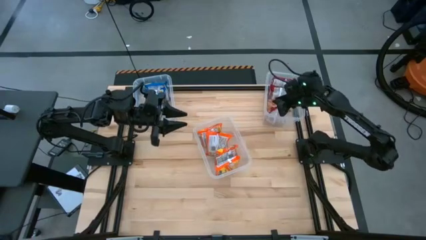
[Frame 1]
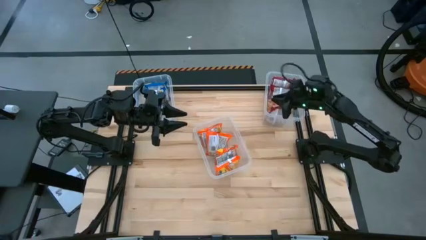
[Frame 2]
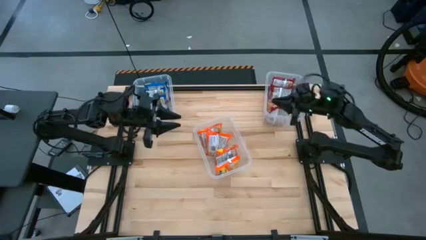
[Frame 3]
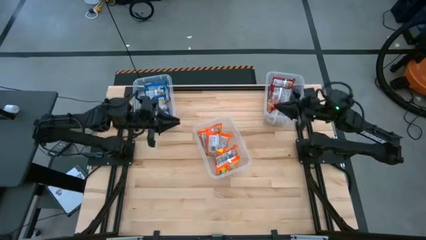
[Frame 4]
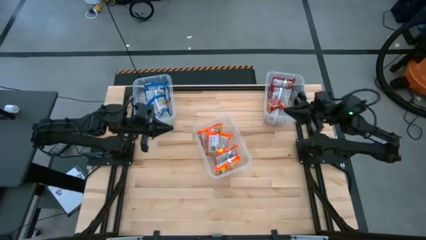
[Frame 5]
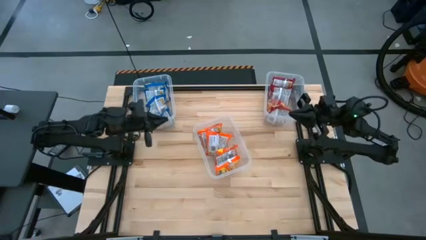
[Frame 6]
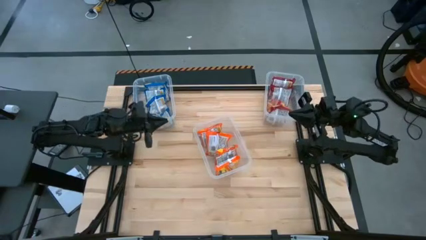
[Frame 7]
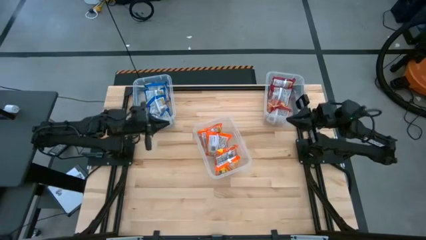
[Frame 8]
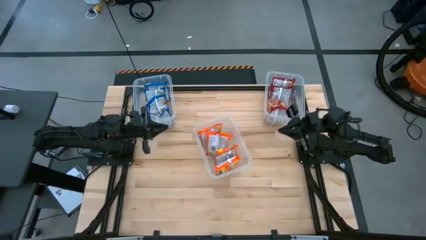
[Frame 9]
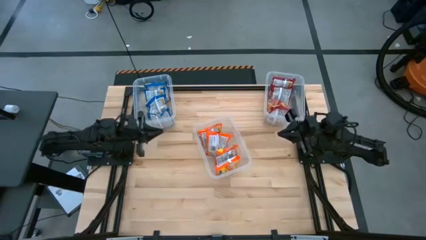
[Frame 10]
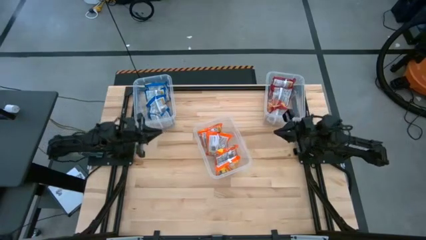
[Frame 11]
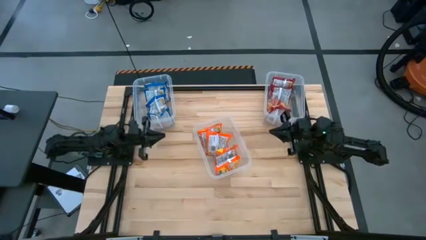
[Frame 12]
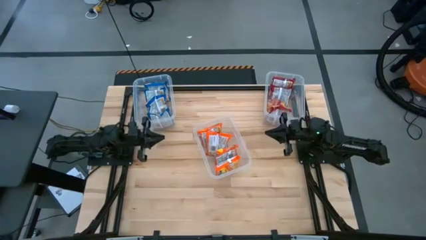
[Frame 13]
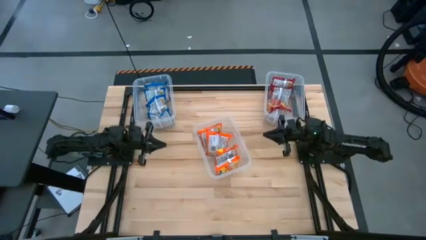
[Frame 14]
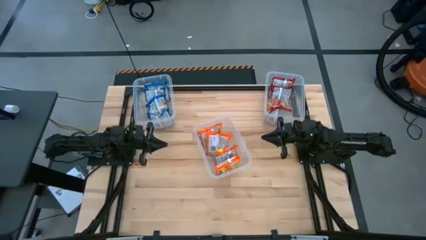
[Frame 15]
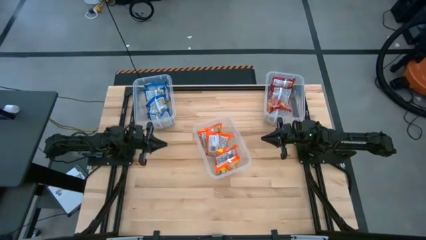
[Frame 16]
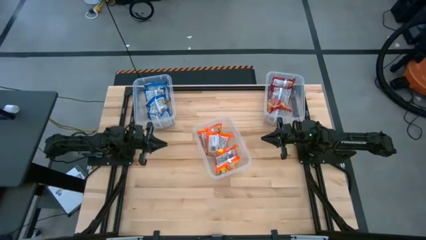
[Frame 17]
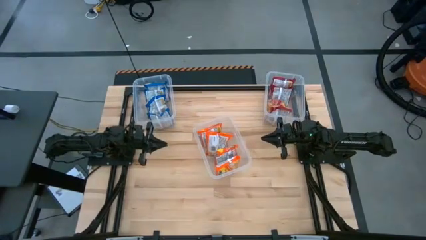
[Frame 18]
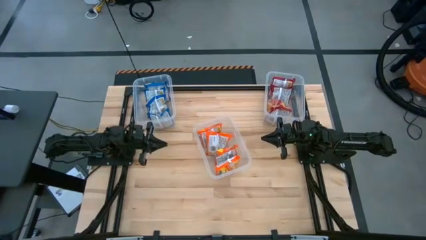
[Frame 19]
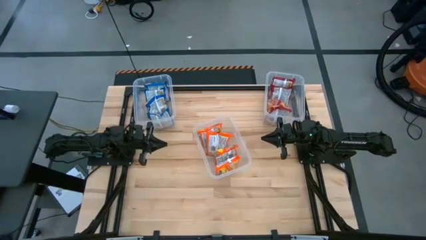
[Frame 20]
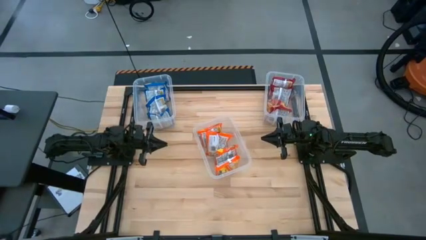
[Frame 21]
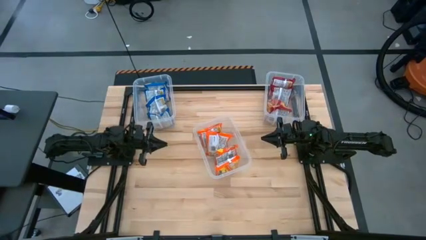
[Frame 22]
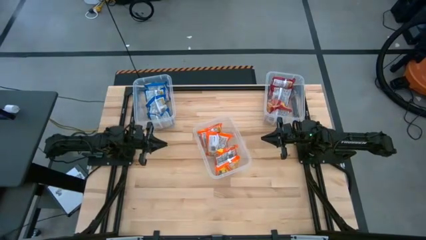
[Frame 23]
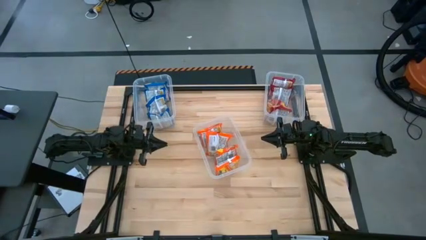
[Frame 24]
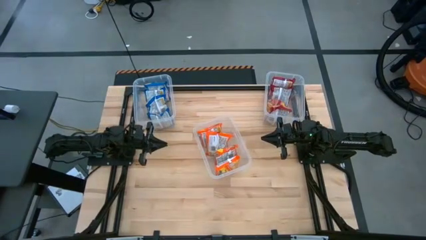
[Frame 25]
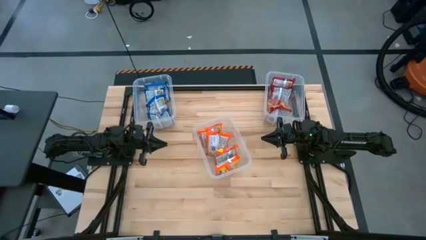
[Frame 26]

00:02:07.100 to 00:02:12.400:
Task: Sort Maruchan noodles
Return to Home Position

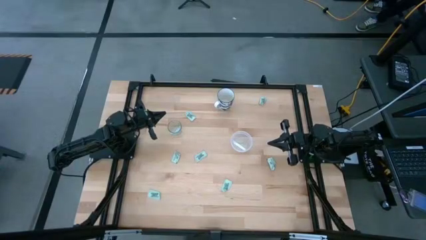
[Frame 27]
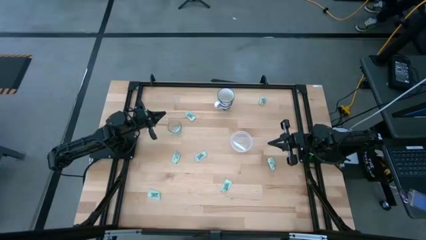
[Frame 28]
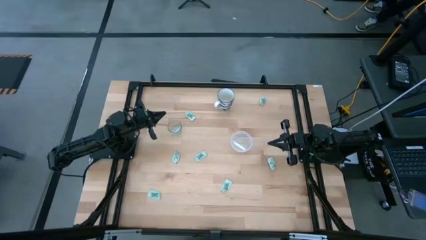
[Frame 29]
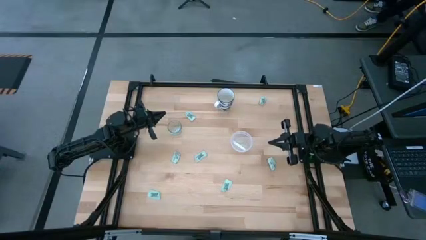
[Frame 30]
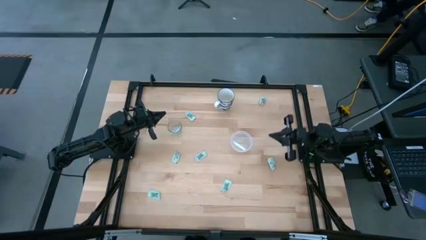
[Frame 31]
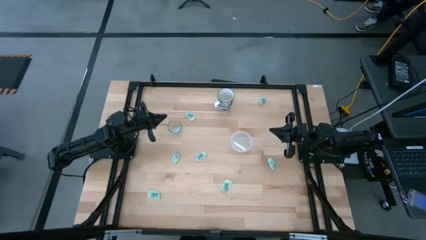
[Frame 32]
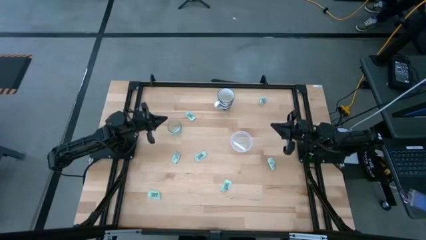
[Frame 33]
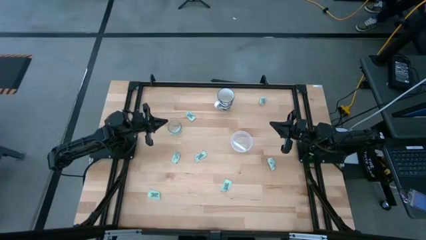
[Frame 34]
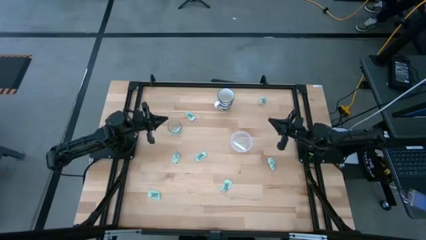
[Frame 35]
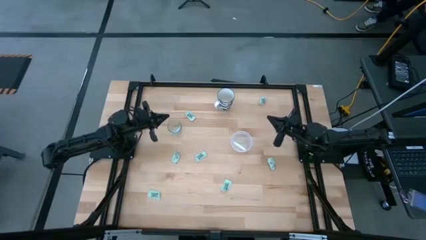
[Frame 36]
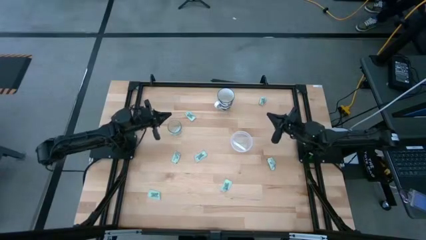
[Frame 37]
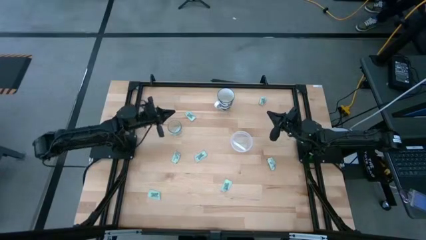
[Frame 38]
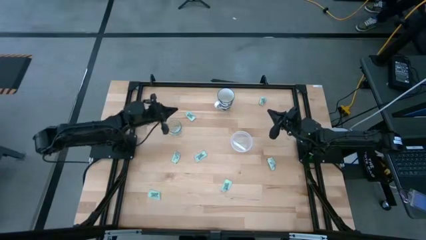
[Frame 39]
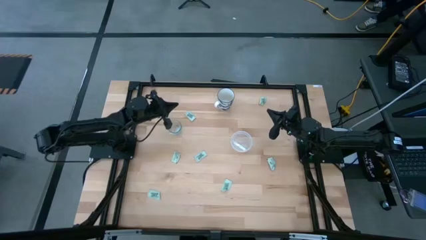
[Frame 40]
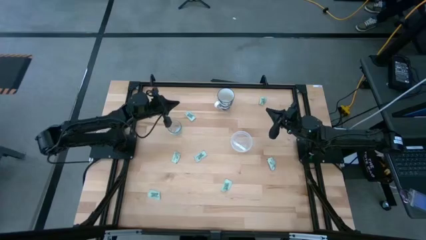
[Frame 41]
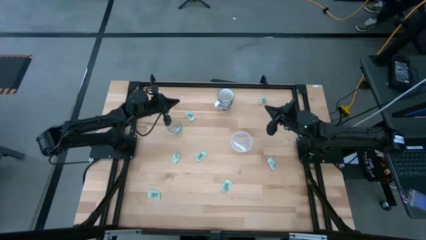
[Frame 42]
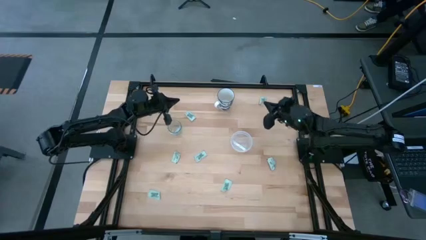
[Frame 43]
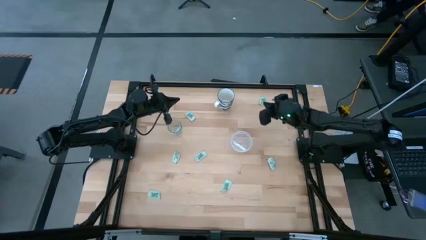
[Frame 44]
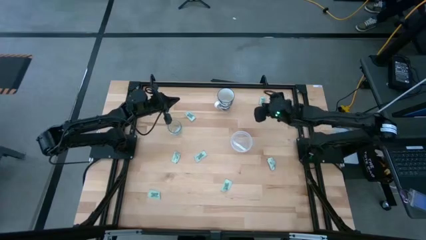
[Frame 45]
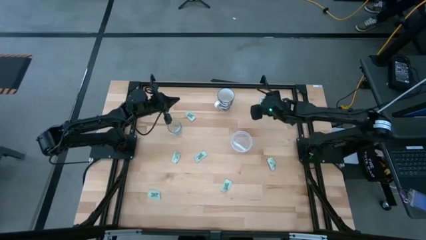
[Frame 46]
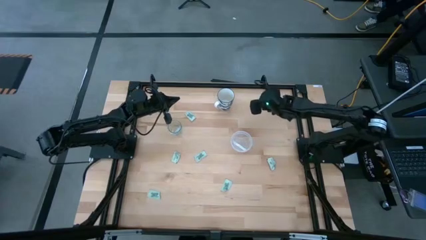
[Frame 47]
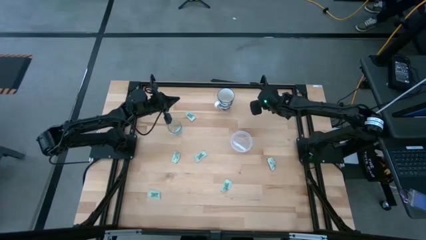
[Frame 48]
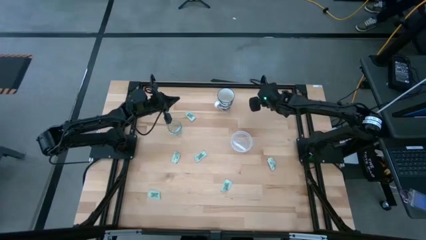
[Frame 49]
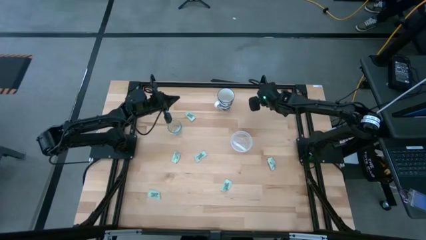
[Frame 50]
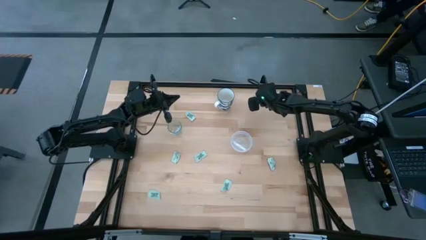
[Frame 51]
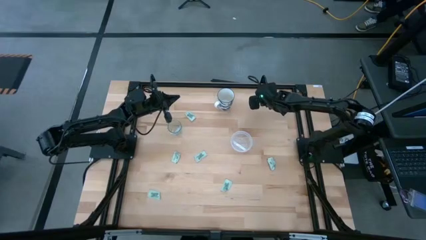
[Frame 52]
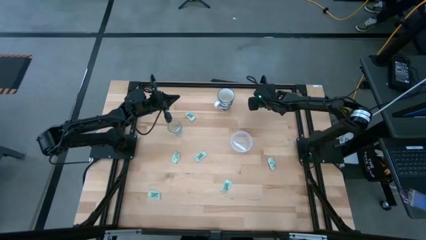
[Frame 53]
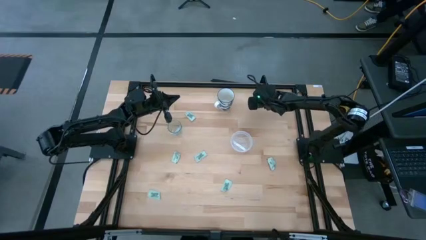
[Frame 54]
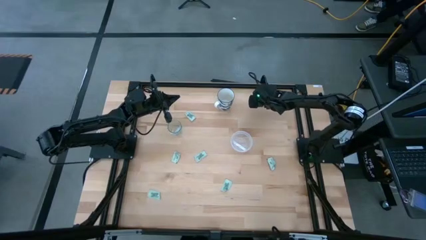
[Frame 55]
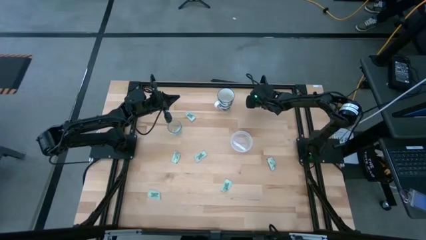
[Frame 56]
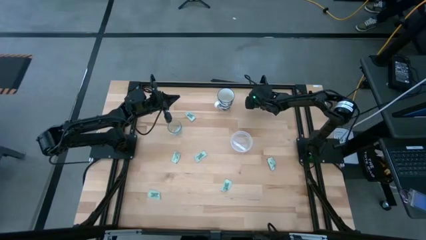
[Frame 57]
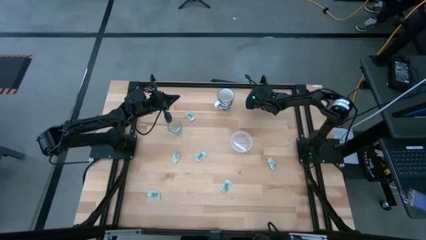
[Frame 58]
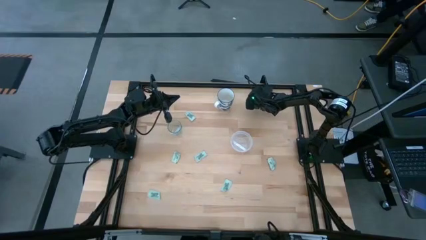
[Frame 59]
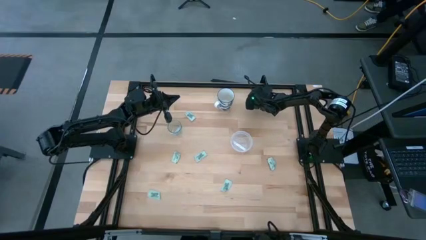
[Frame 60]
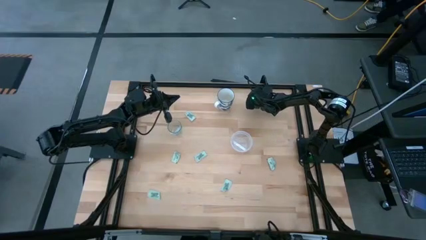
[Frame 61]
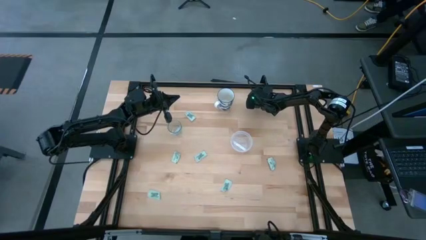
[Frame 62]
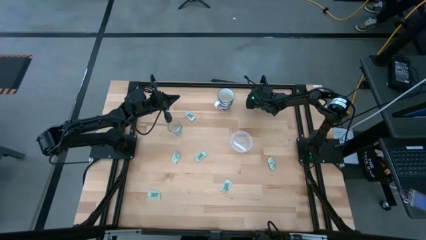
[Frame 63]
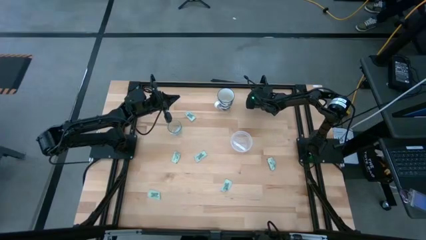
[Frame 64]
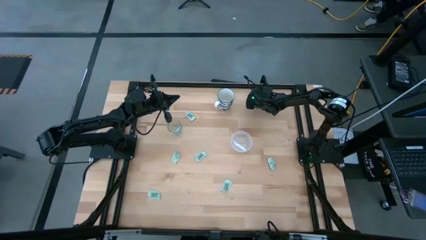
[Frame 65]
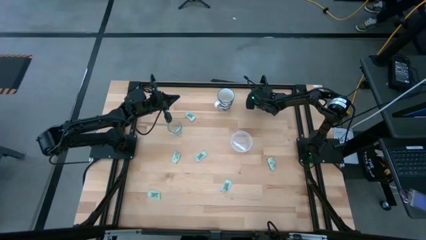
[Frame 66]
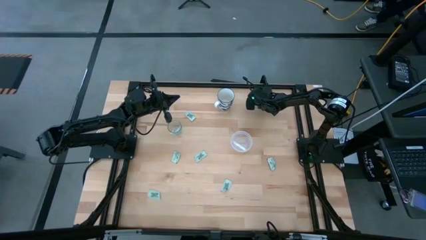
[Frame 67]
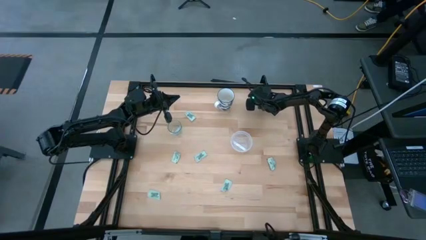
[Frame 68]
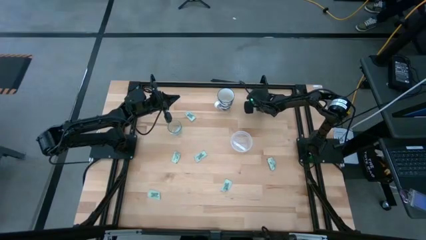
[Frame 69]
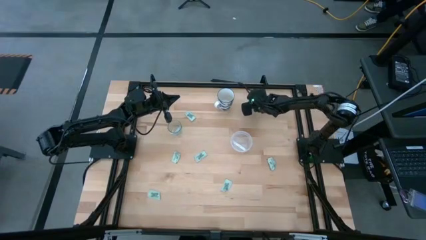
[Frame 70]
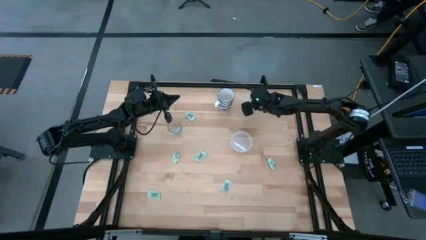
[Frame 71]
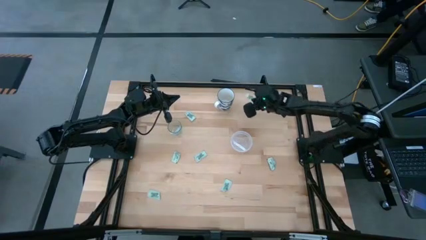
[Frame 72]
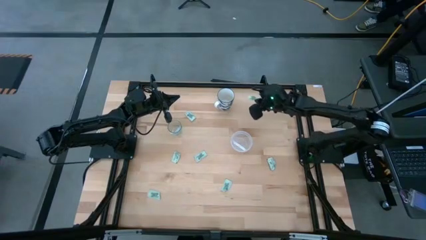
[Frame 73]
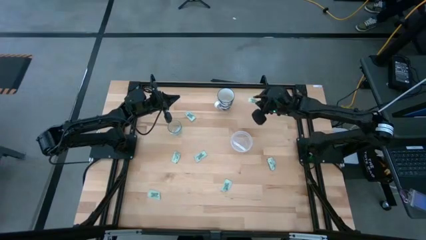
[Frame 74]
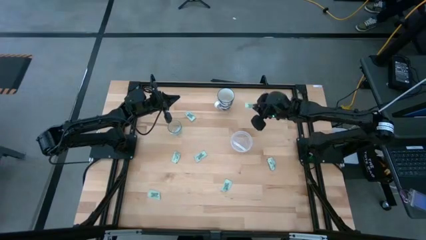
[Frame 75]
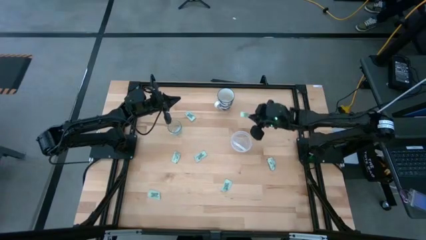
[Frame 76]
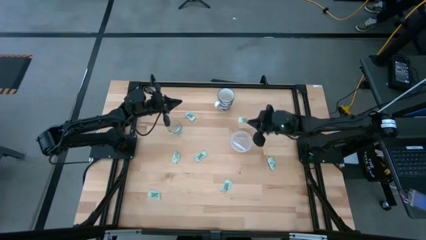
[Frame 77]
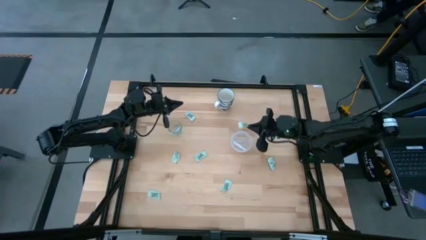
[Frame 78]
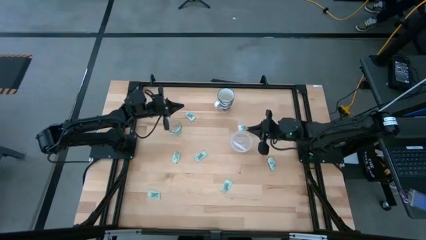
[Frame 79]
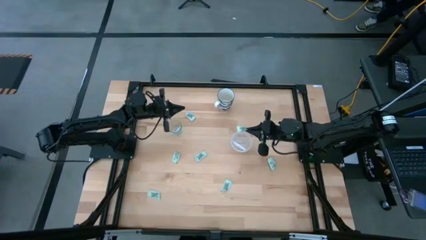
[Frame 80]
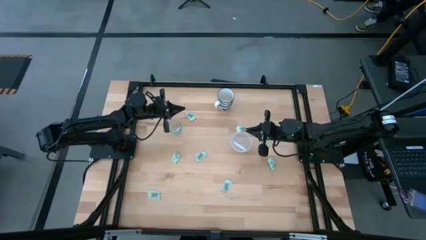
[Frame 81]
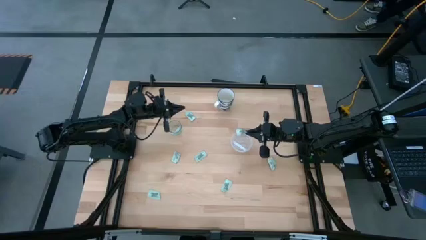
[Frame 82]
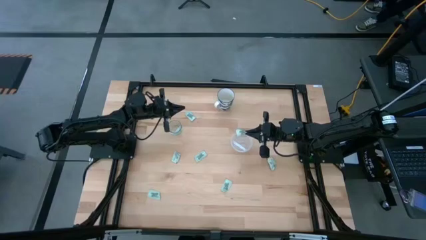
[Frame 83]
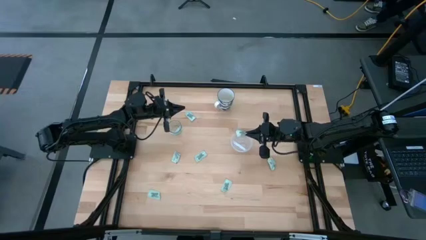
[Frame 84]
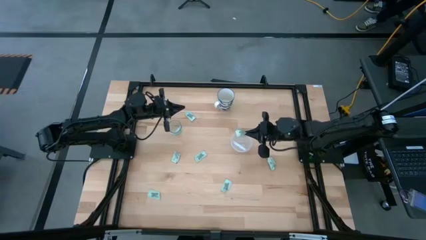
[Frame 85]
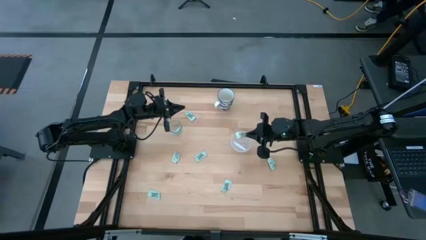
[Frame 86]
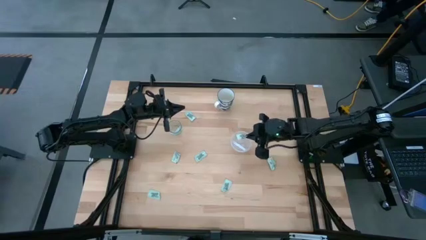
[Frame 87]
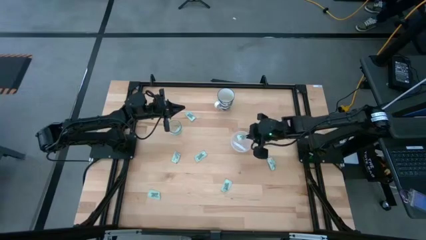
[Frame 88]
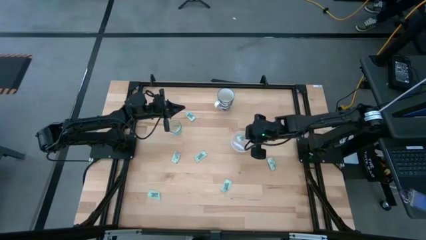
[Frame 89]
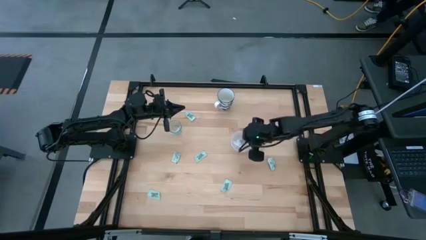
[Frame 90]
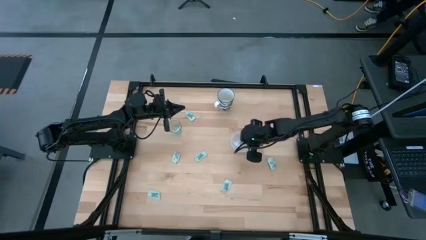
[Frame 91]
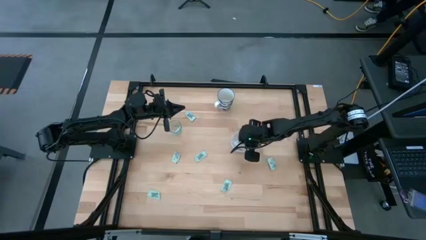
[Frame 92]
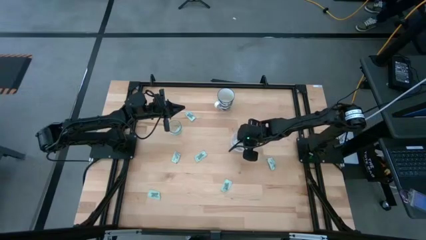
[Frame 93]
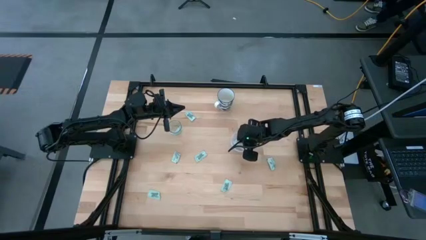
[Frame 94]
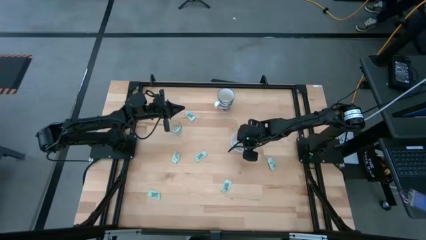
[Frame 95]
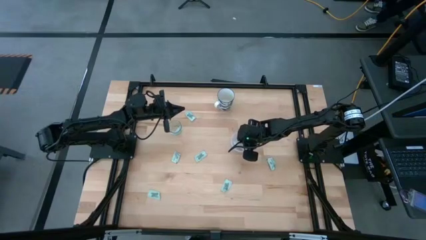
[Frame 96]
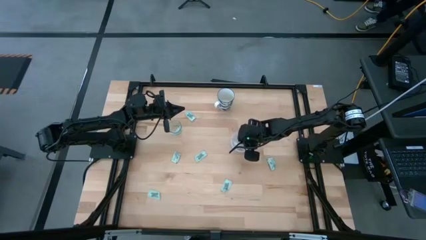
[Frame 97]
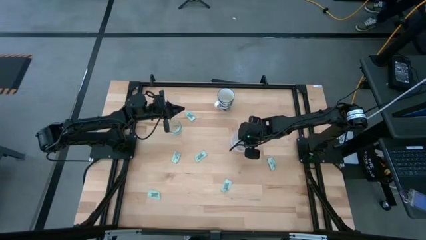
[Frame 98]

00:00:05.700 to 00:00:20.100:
Task: Pick and place Stevia / Truvia into bins
Put the stevia packet into the transparent container
